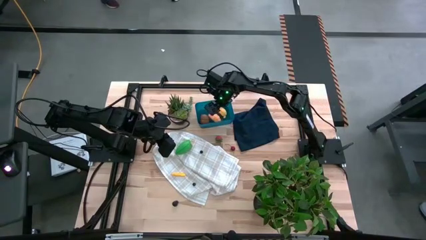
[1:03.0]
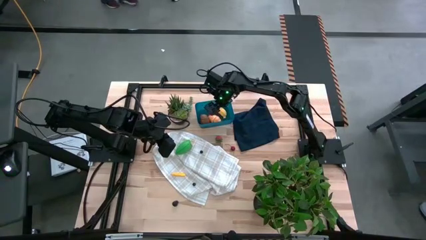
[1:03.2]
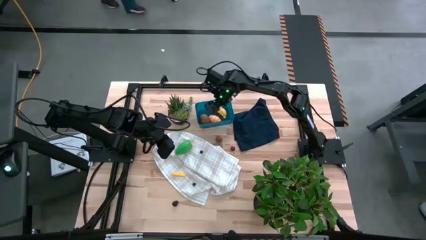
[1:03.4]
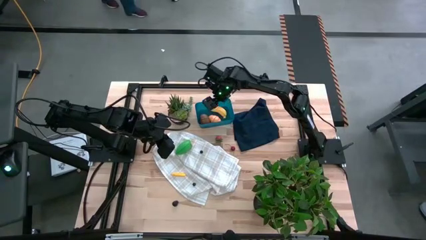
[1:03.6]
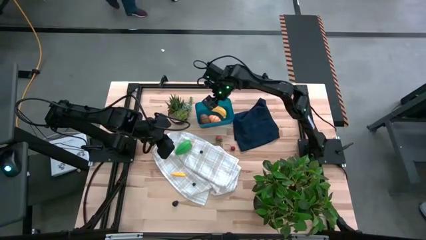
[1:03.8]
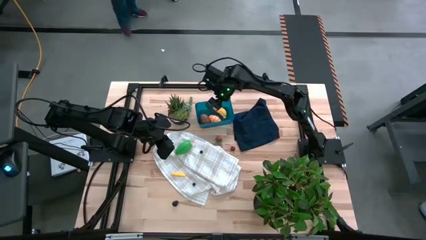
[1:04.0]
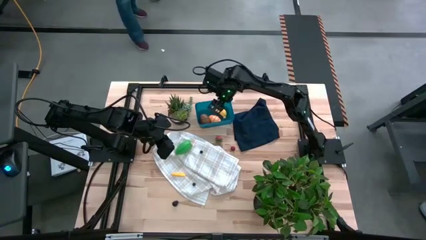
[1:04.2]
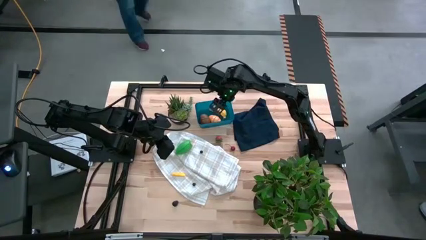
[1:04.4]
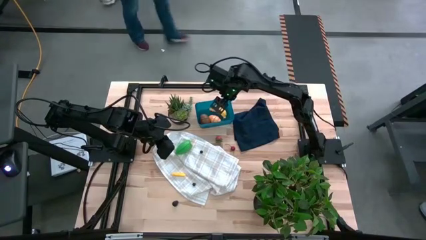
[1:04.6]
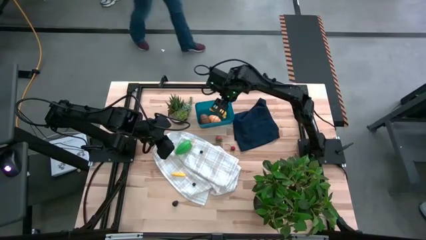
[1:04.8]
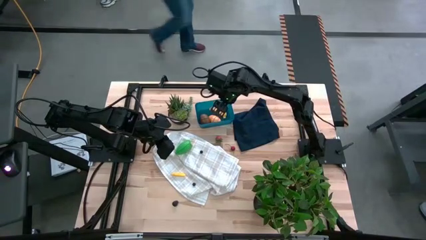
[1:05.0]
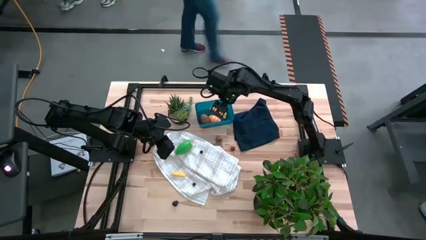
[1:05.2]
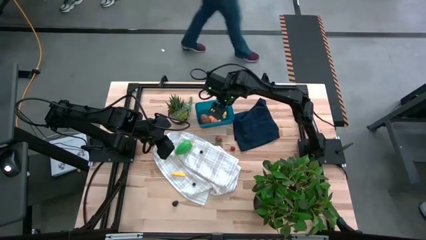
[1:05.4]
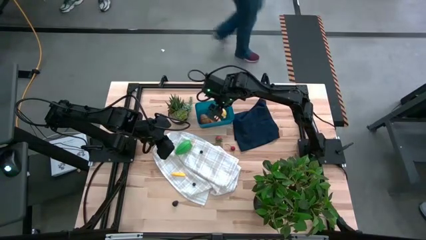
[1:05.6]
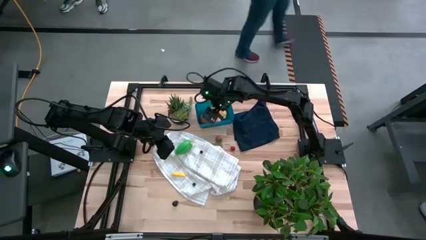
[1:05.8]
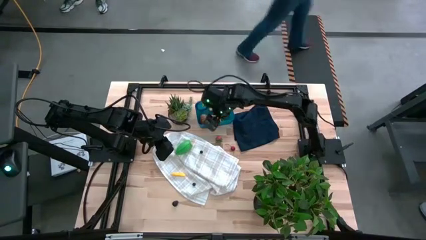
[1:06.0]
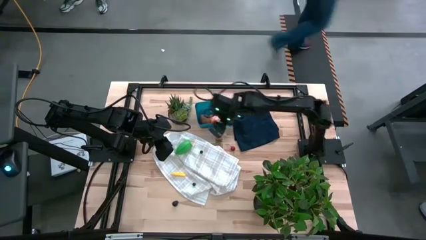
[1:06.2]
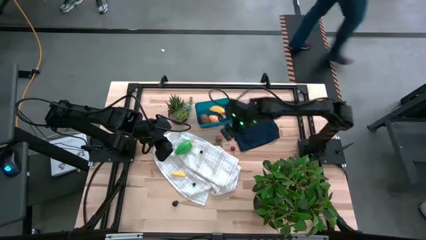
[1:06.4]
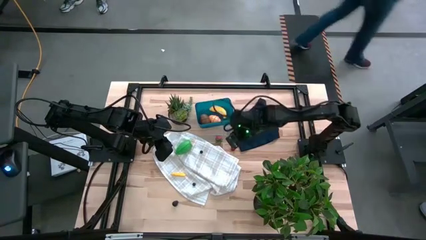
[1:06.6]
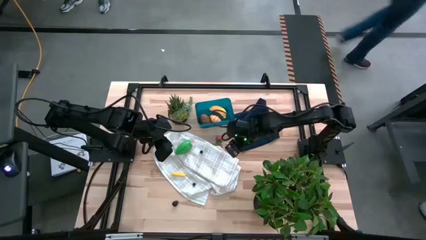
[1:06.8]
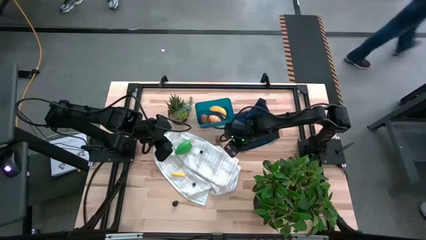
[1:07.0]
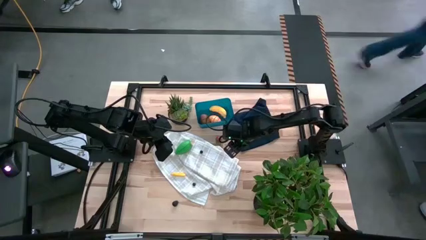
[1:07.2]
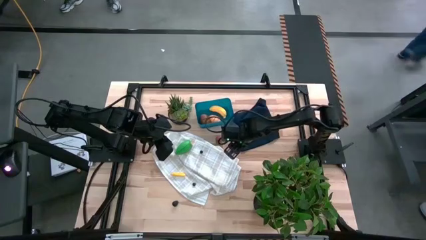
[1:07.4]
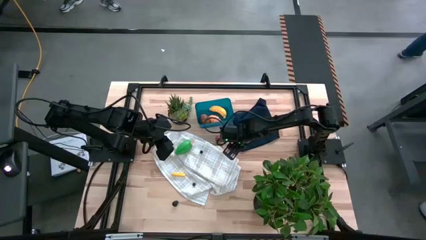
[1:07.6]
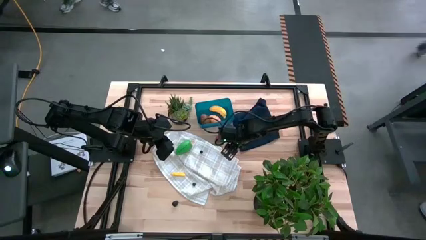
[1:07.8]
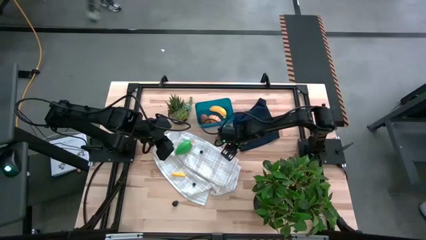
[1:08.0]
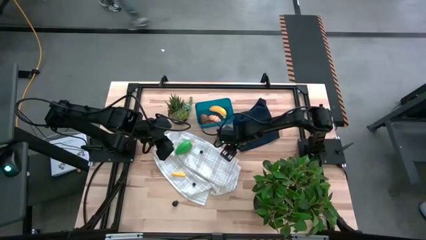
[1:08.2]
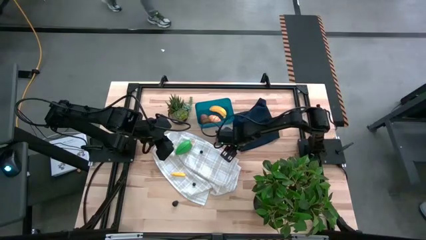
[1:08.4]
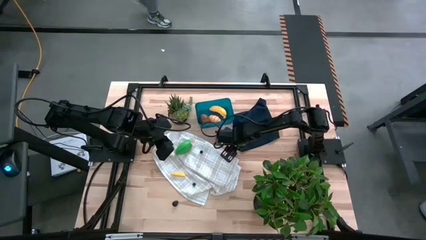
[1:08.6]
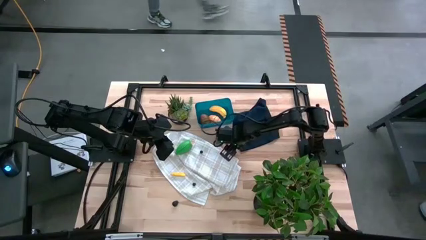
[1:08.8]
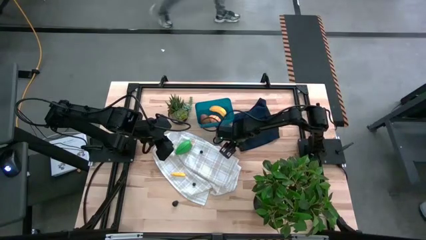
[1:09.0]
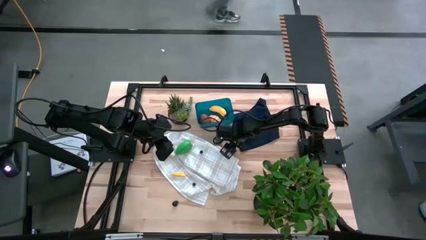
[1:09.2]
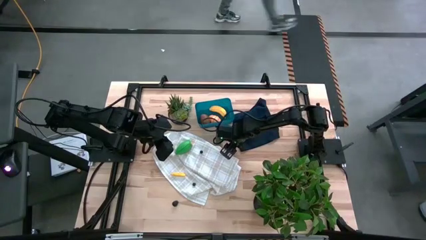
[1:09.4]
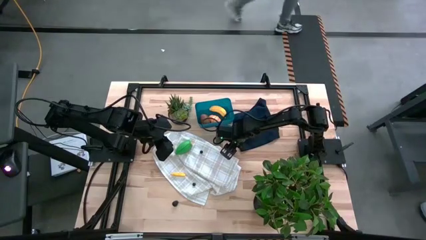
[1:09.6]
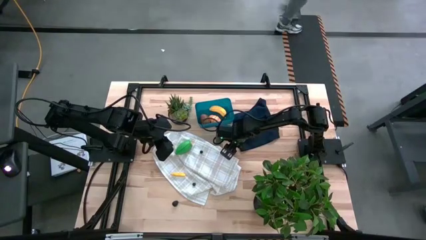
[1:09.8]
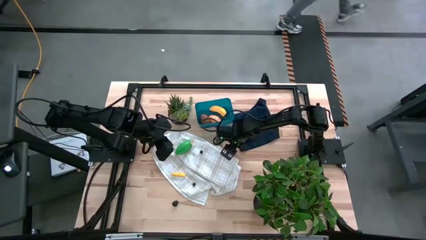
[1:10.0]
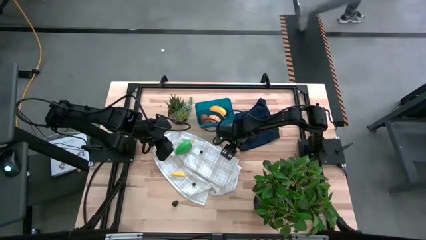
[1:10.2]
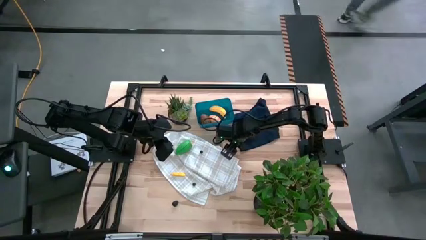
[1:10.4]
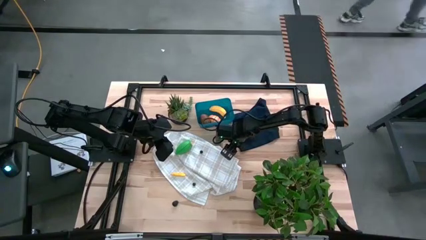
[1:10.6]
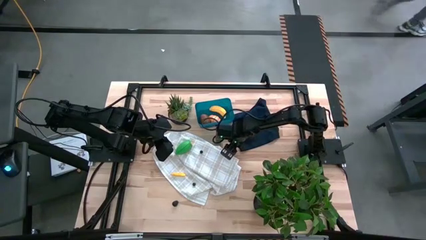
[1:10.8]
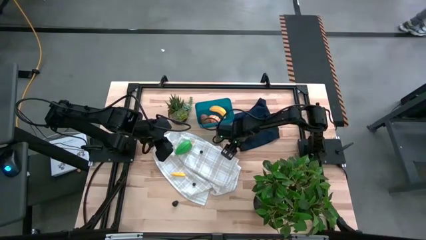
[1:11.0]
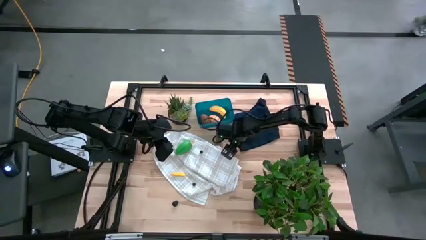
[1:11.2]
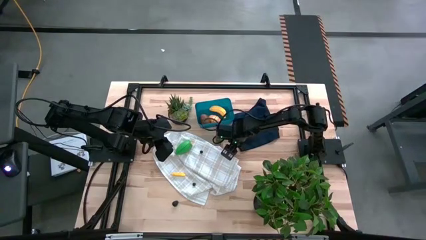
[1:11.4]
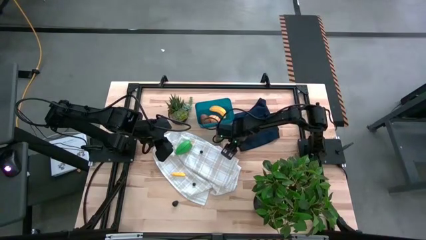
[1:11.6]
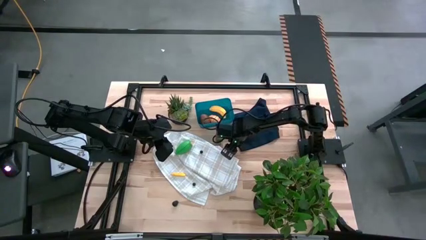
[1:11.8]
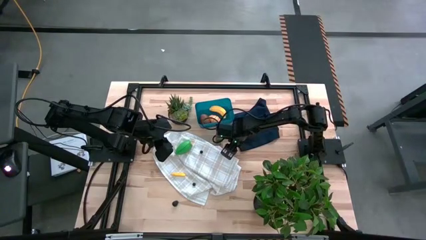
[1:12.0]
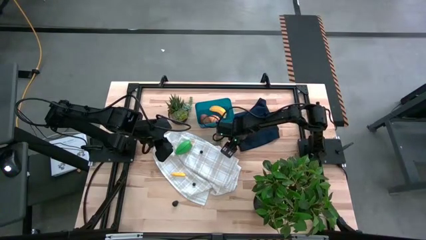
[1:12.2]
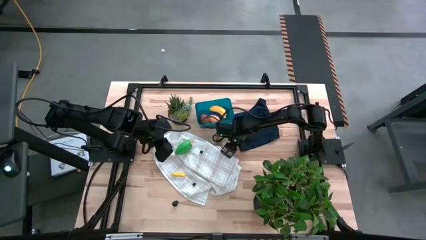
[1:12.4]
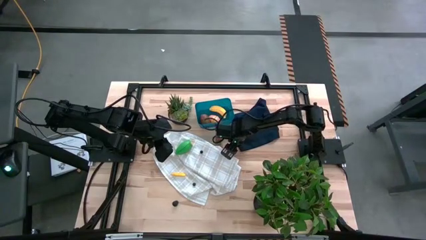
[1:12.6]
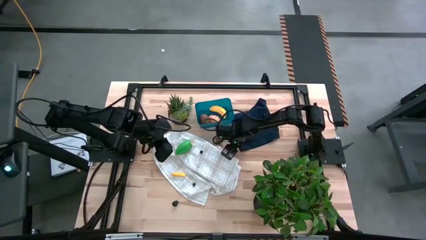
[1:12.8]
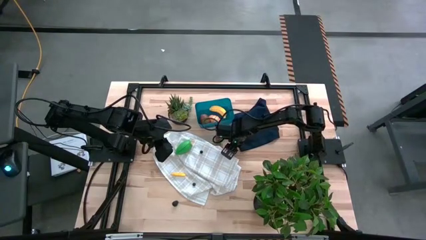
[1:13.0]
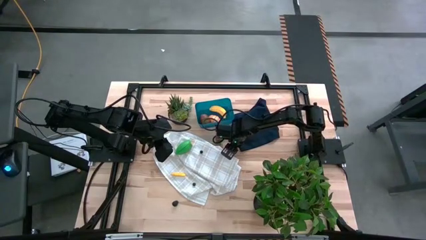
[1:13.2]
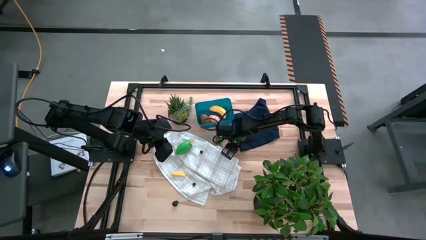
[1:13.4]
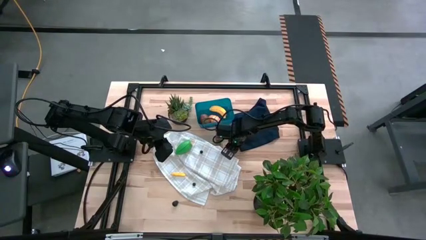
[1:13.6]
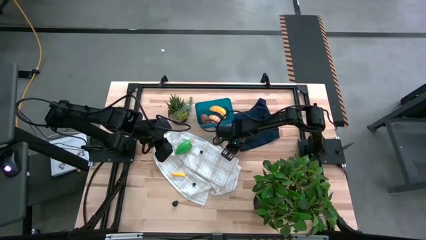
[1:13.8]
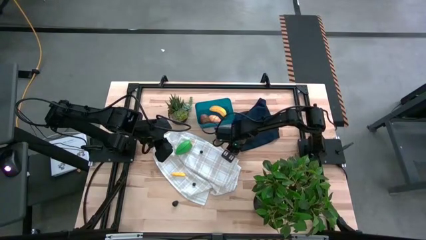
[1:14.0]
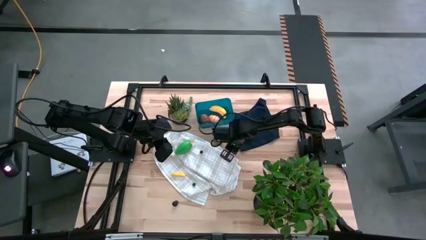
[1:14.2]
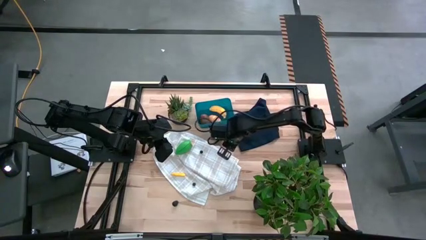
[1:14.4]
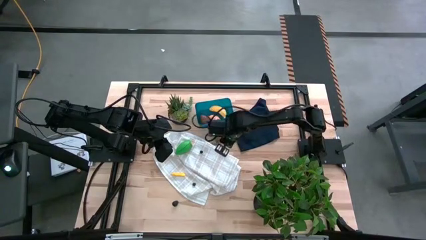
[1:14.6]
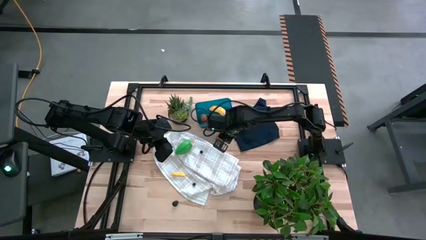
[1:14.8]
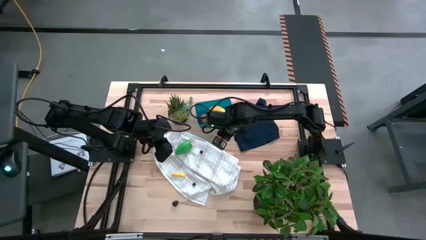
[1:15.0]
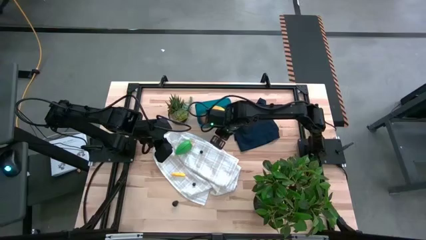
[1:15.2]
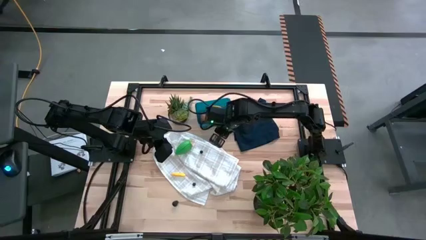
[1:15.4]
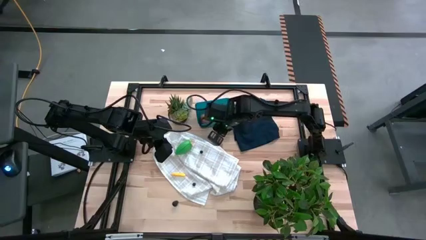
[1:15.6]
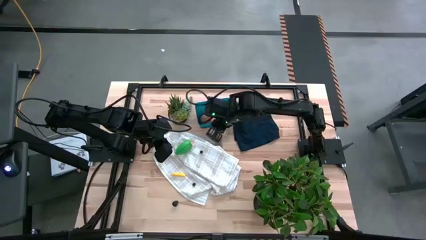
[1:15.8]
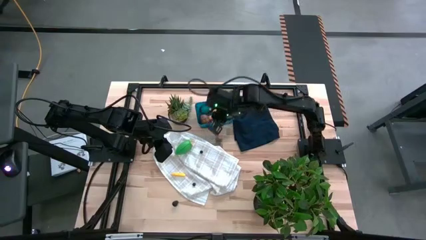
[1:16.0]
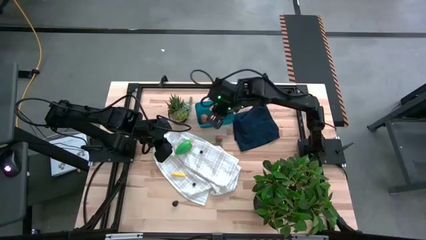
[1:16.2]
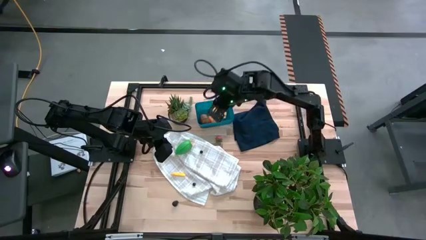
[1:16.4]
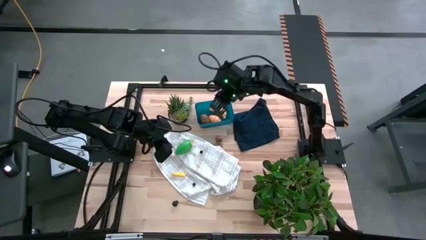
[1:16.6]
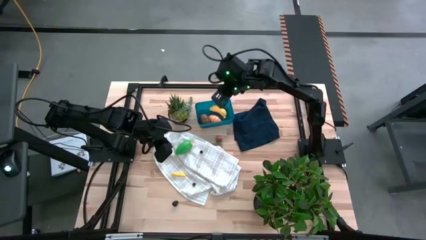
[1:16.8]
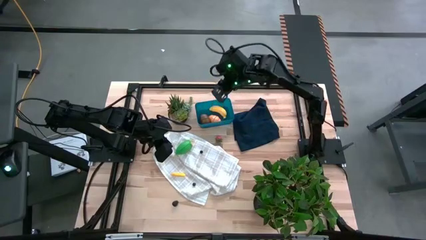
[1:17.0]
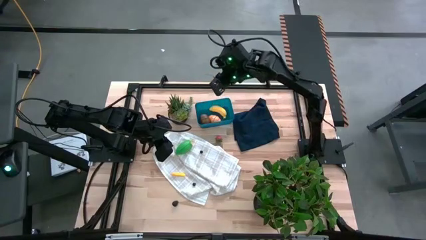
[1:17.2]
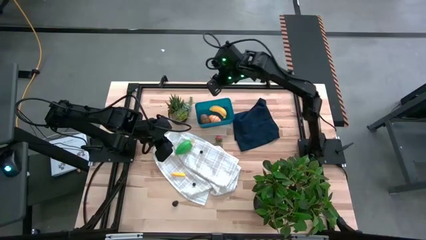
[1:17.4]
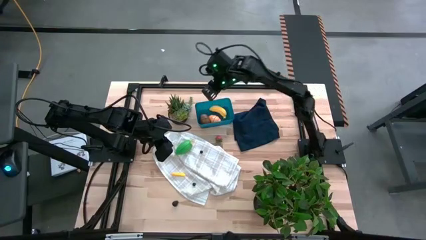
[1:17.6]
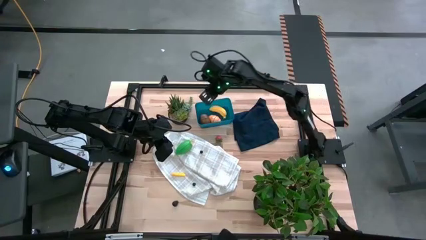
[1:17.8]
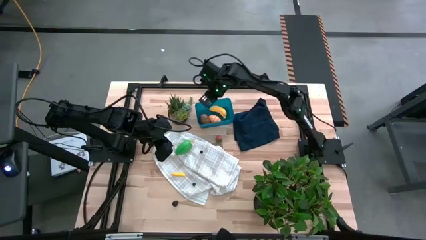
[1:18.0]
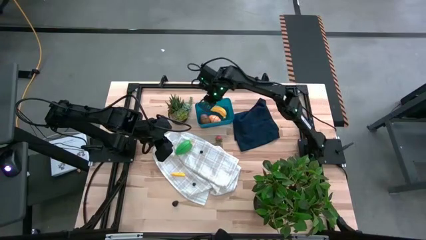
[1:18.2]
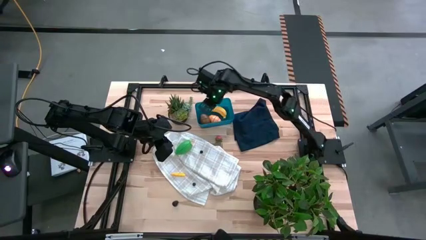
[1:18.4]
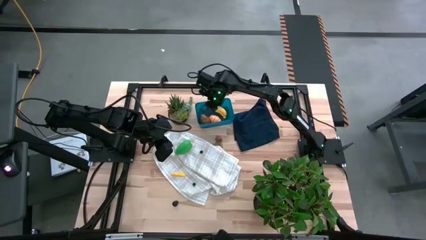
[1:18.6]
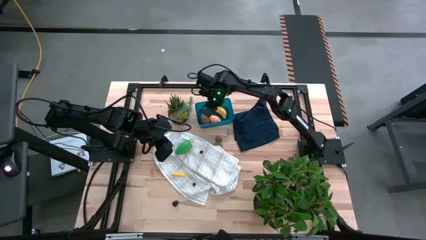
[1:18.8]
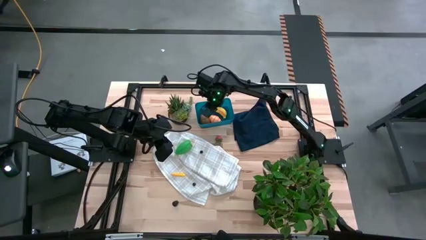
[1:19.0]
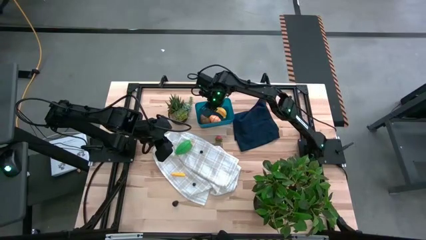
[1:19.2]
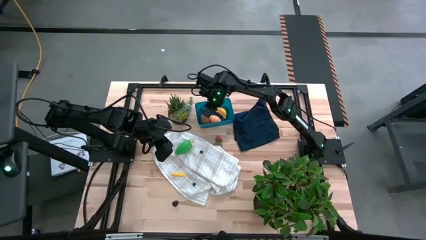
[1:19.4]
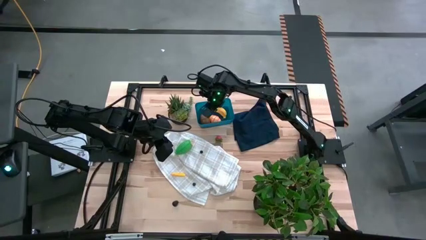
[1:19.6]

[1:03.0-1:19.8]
Task: Pick and placing Produce into tupperware
Put the cherry into the blue bin
